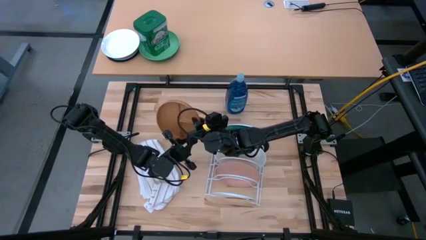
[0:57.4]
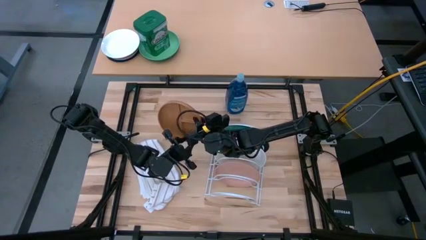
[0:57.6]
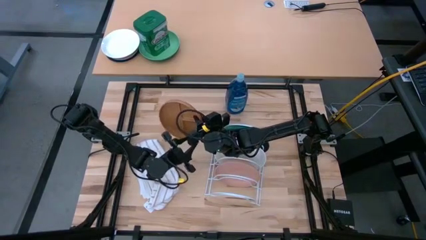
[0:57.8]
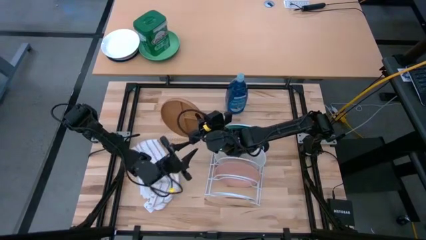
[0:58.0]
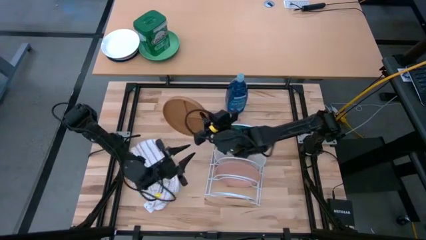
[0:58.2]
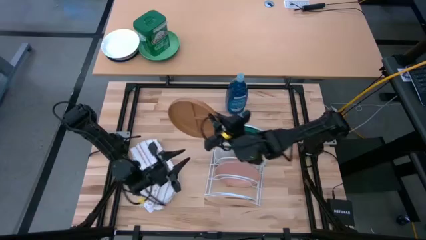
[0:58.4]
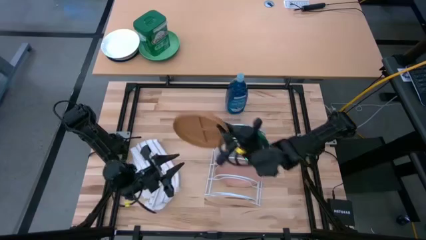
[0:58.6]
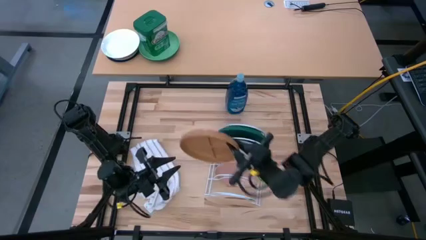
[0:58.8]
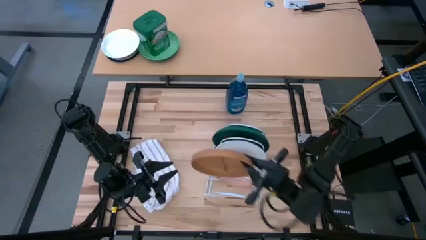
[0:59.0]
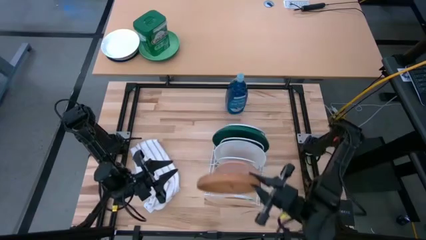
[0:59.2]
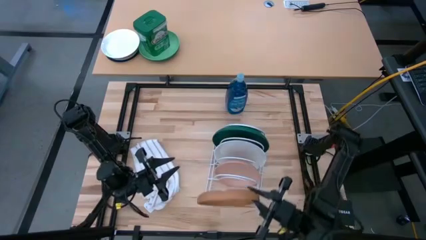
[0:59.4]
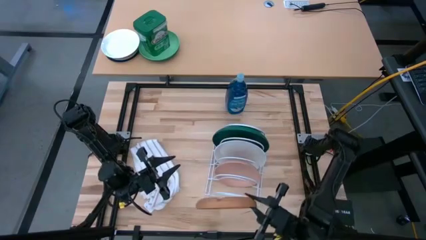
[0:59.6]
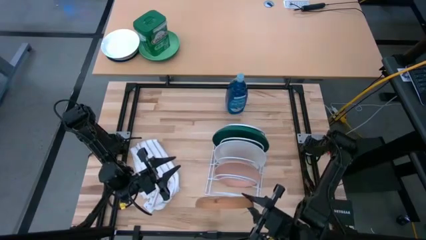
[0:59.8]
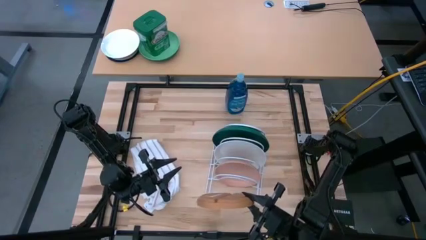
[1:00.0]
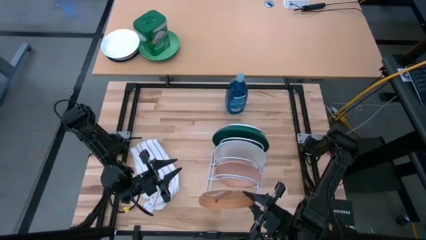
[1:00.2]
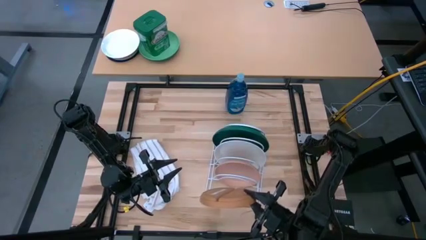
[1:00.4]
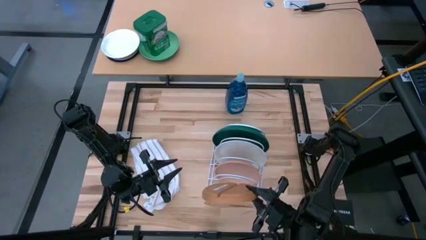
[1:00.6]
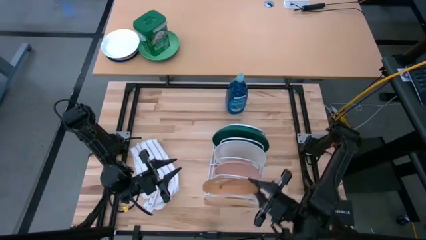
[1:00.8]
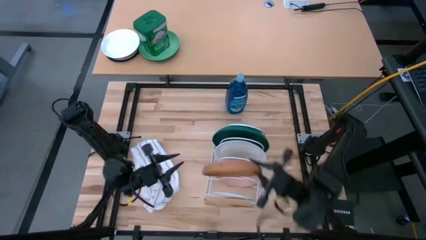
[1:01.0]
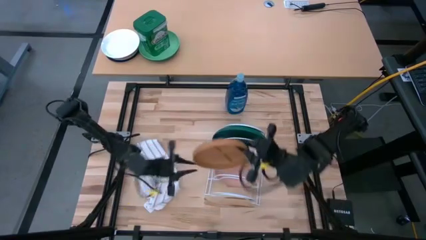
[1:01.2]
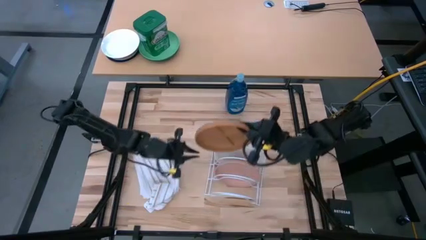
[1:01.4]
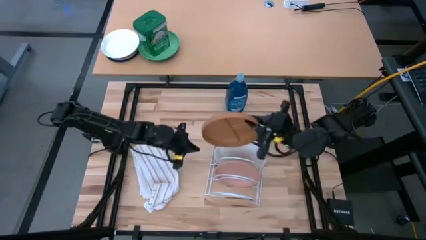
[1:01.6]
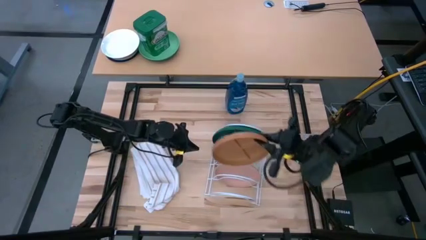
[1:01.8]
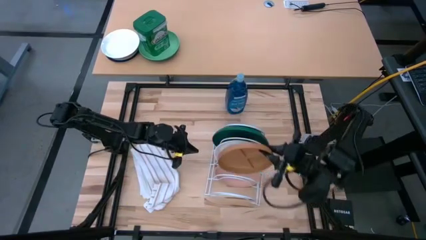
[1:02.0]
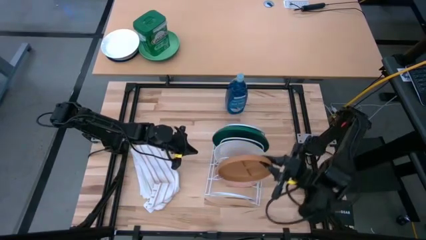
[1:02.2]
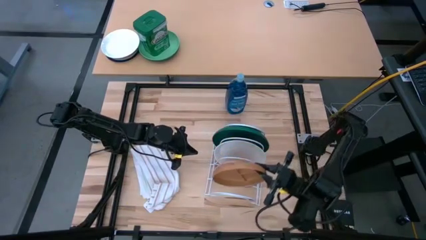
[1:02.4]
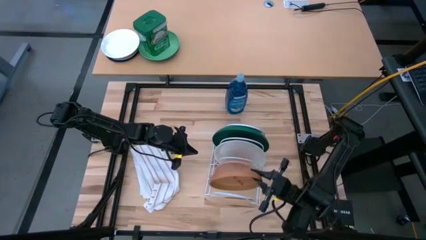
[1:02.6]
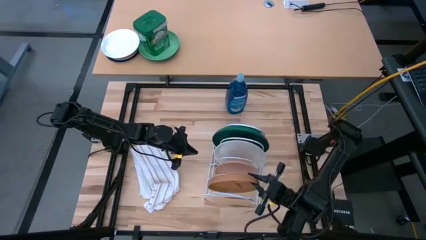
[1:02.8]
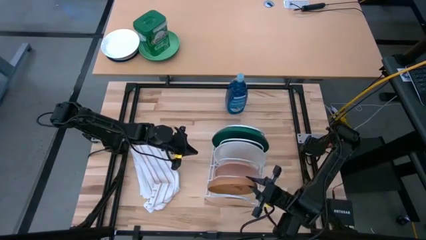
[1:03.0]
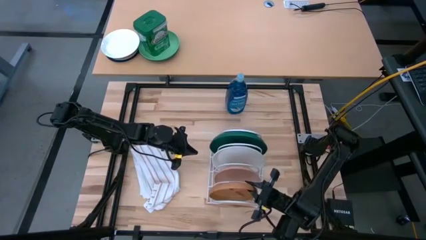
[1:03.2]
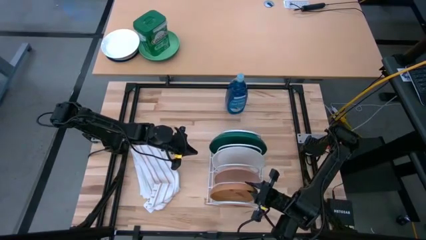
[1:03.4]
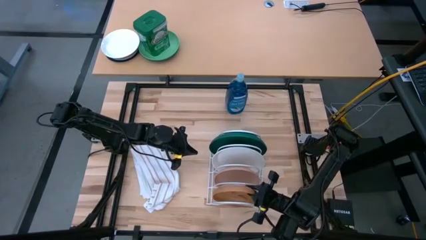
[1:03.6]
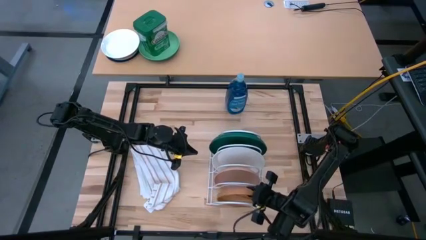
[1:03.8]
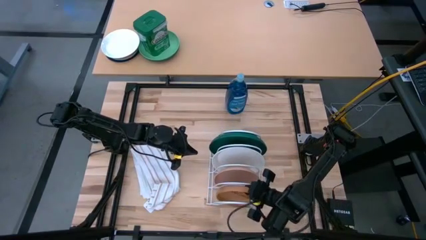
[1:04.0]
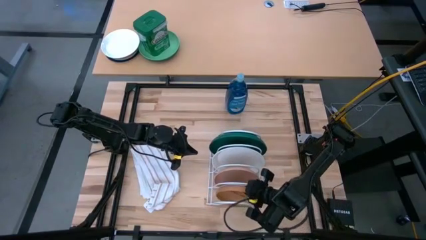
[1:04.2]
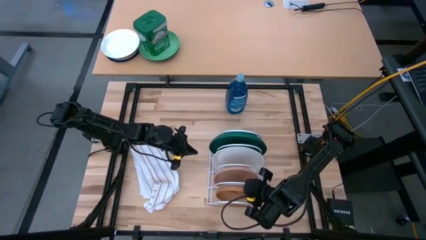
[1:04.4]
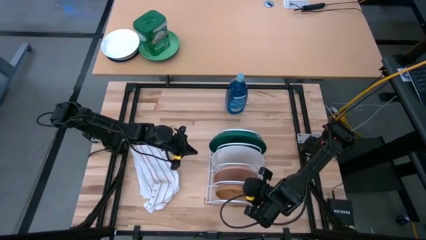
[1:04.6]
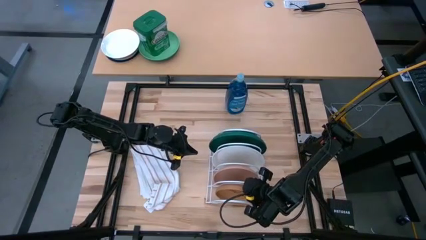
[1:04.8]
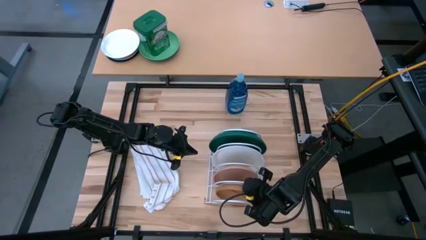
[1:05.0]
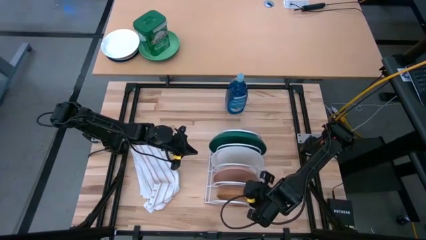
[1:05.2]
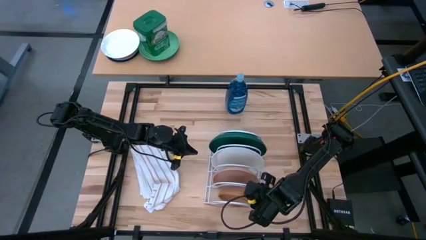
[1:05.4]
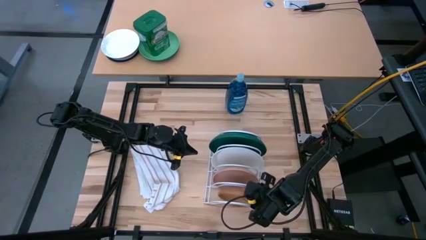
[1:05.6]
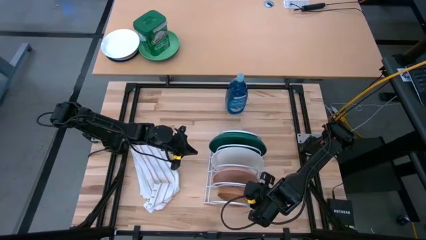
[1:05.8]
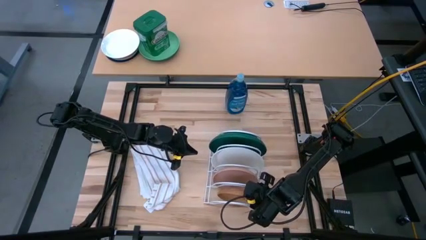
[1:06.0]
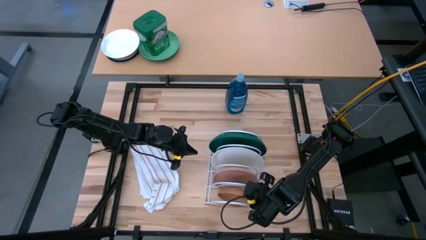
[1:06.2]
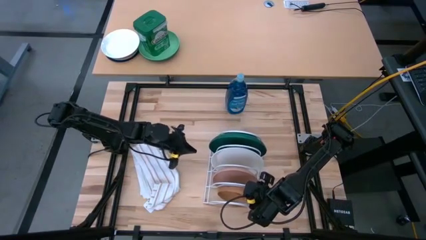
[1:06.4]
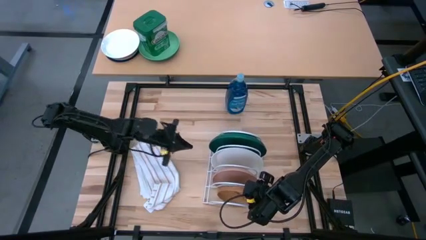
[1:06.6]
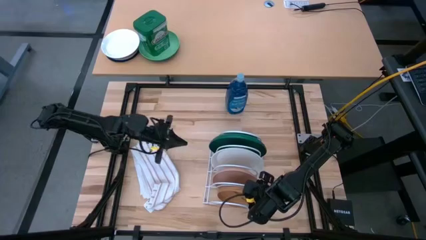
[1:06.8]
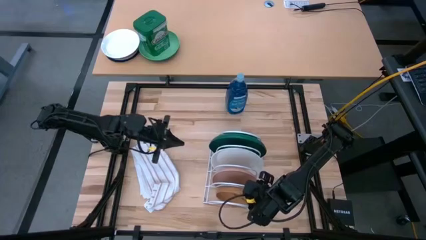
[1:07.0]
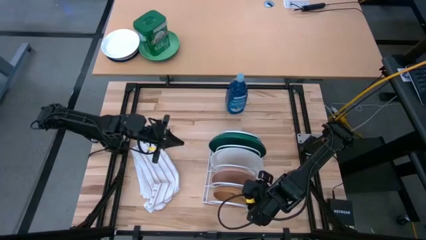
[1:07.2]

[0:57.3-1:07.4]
Task: Sort dishes
Put the brown plate in the dish rack

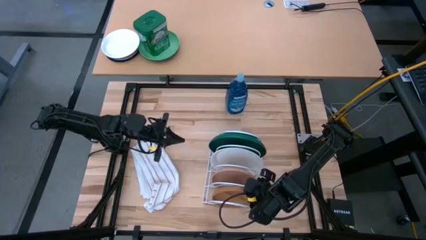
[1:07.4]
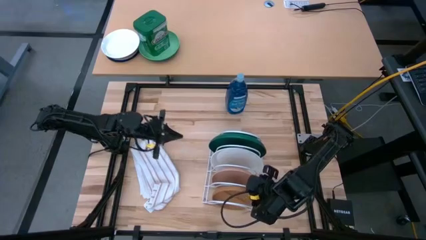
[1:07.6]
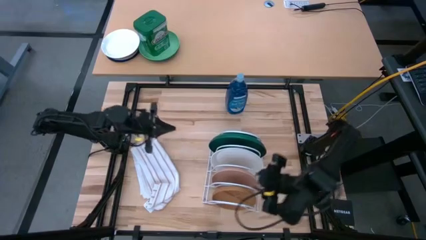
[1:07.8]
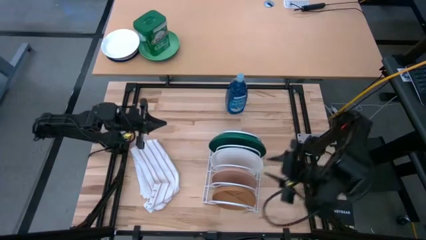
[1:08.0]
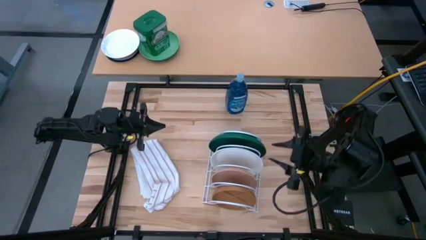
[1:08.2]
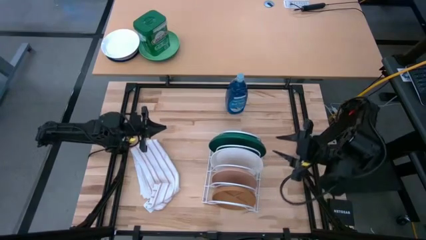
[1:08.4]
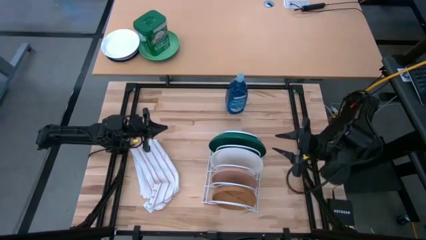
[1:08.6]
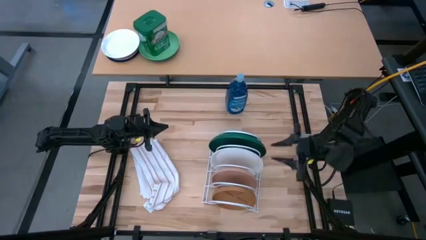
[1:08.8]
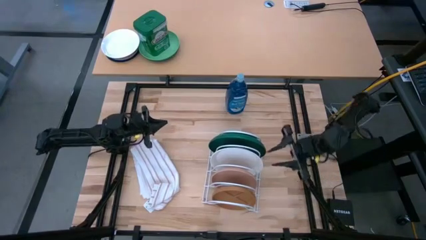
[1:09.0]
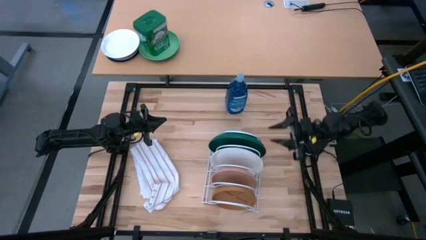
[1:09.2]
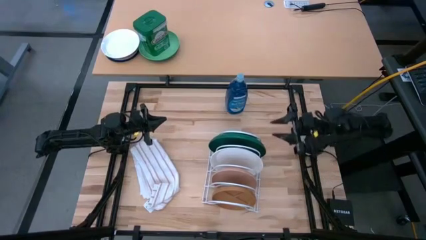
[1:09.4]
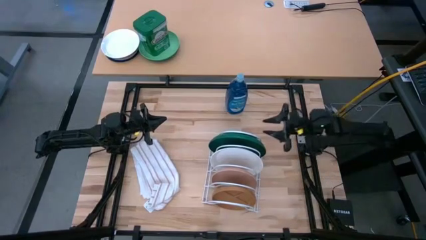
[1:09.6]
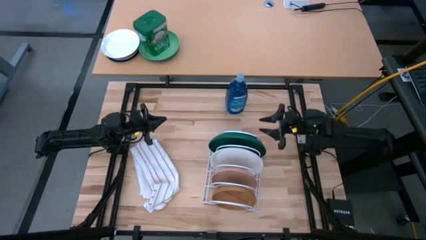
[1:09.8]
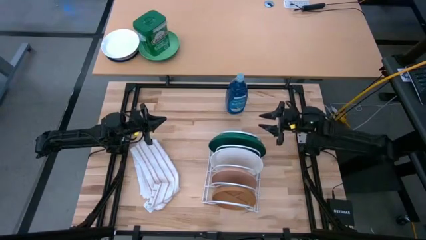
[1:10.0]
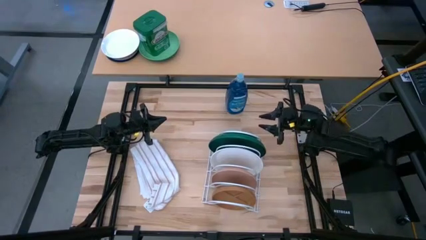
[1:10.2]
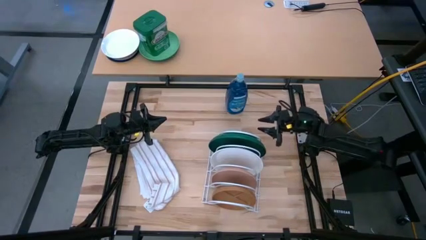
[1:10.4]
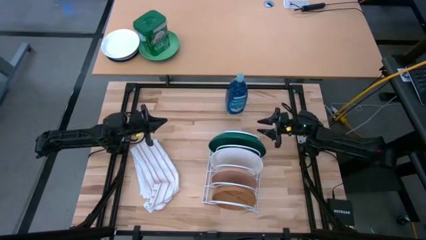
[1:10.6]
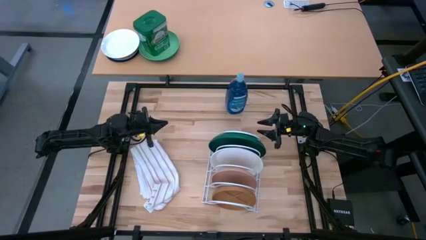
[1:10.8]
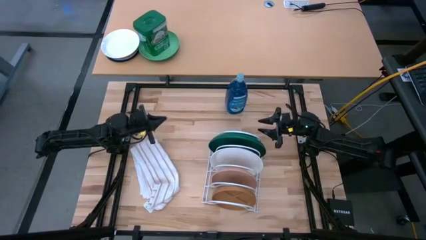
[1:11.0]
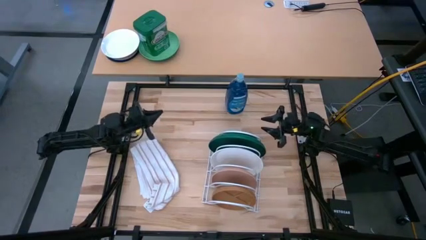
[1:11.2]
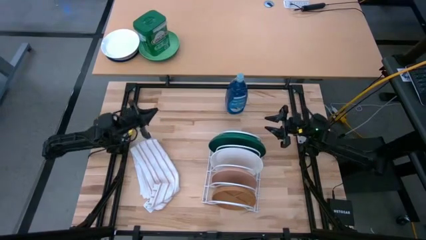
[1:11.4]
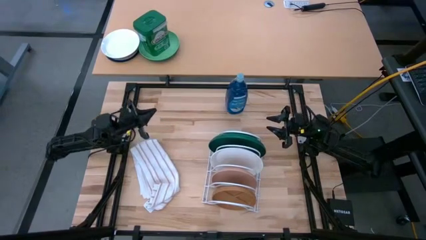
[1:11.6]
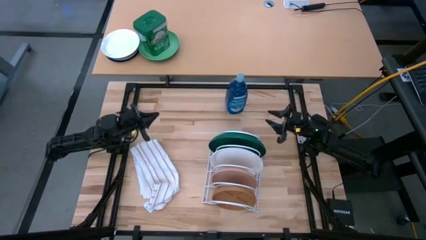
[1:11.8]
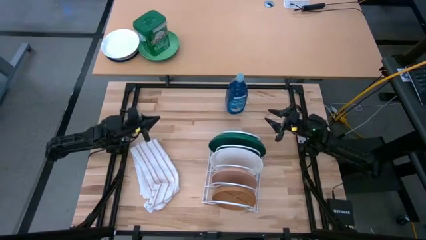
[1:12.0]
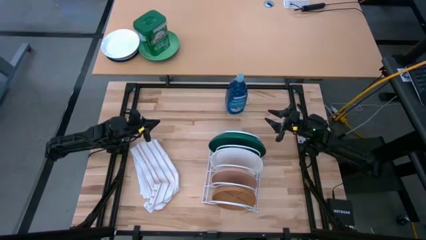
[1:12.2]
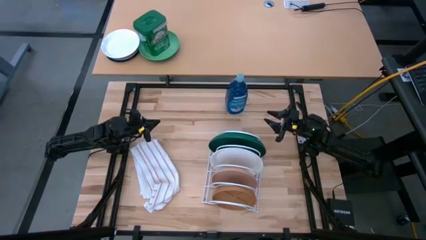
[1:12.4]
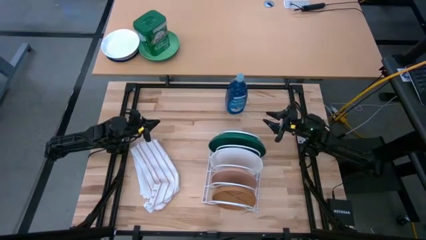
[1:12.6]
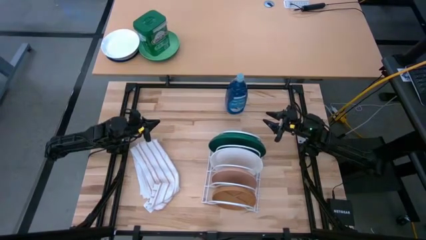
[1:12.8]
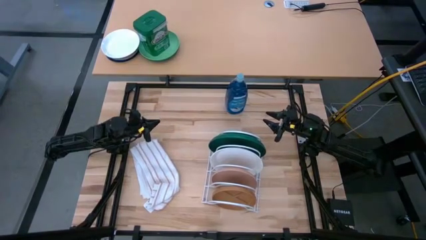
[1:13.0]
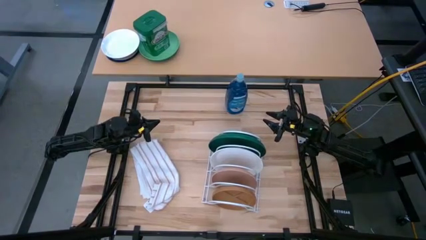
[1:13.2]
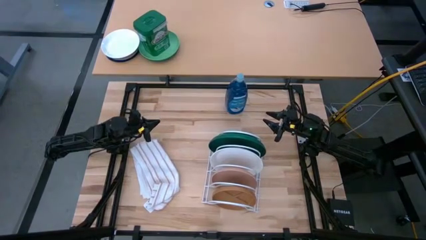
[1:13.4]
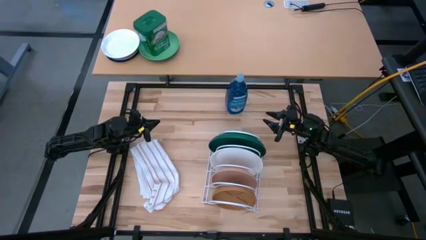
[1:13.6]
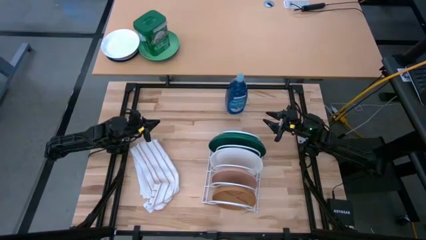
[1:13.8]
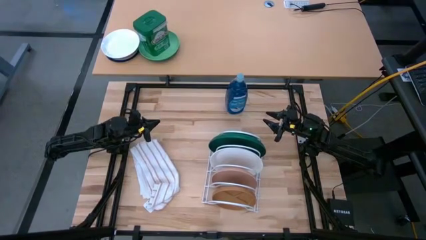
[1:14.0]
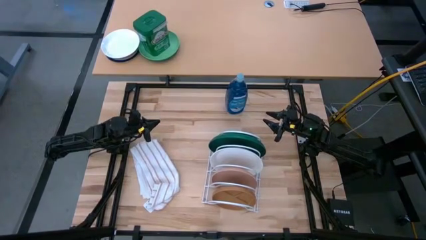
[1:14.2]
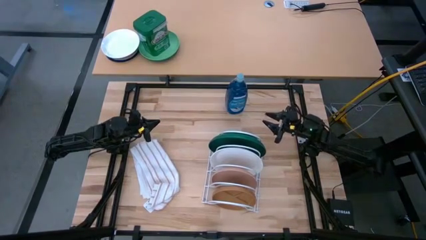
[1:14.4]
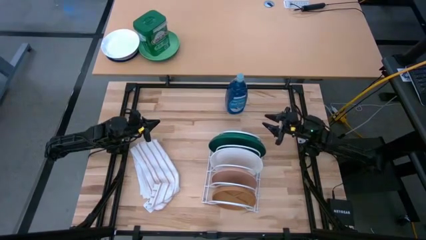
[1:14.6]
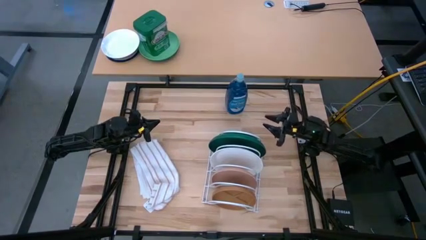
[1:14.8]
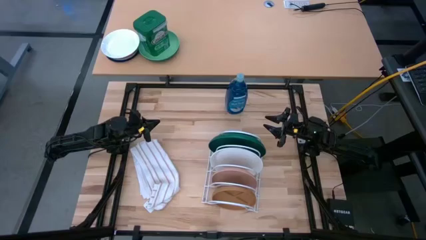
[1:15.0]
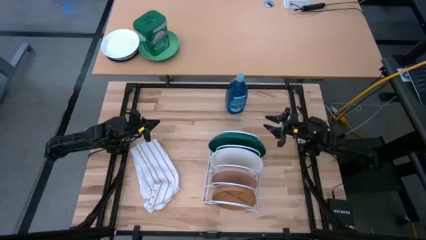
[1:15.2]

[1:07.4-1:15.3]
Return to Home Position
